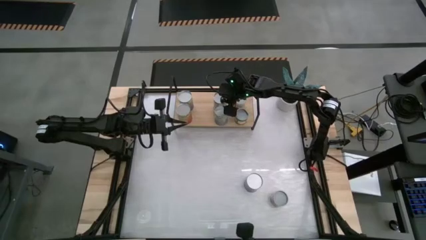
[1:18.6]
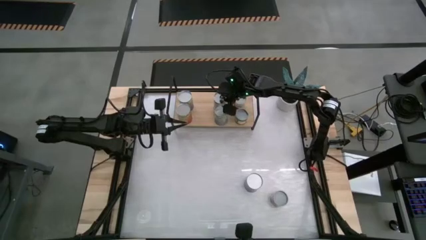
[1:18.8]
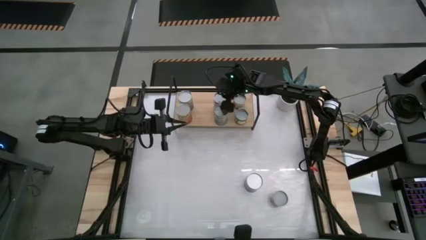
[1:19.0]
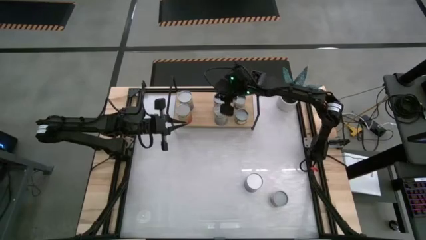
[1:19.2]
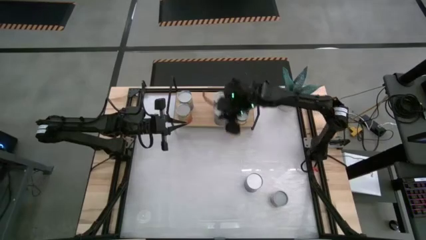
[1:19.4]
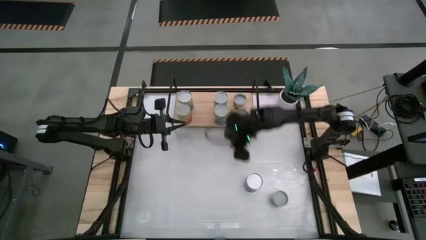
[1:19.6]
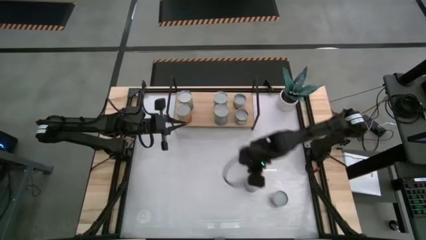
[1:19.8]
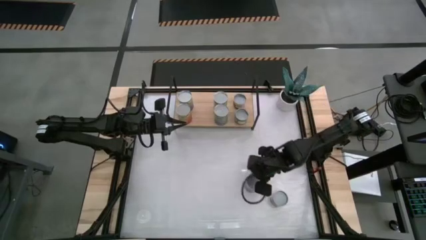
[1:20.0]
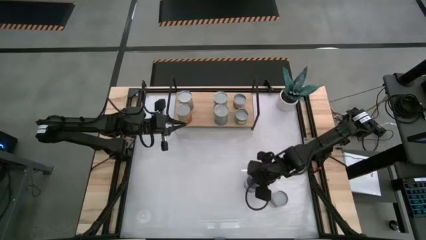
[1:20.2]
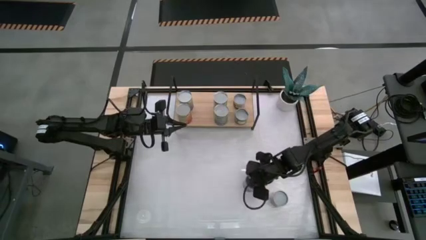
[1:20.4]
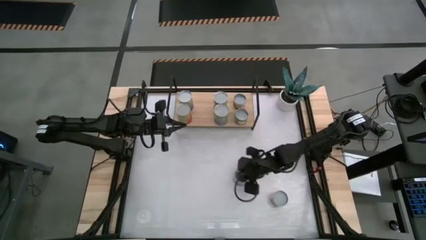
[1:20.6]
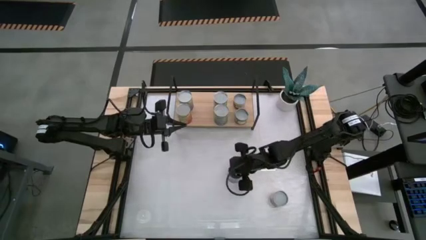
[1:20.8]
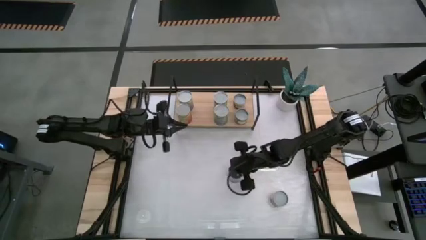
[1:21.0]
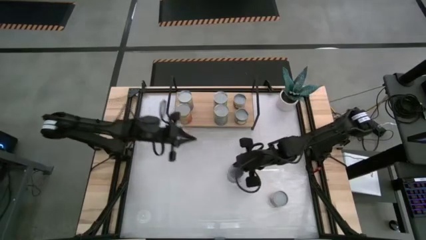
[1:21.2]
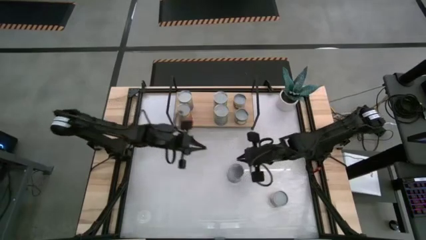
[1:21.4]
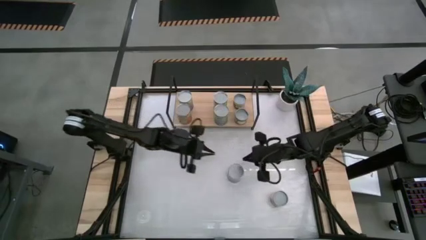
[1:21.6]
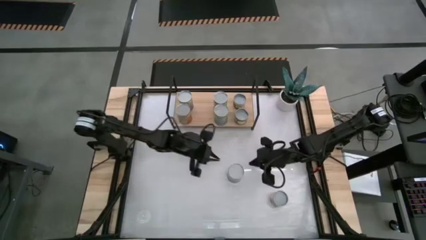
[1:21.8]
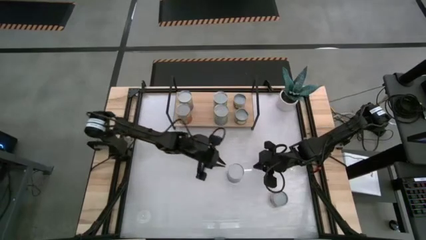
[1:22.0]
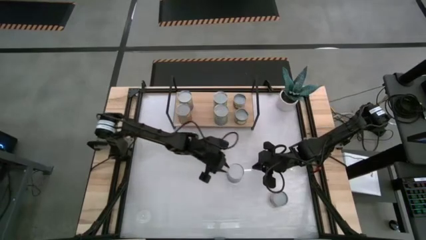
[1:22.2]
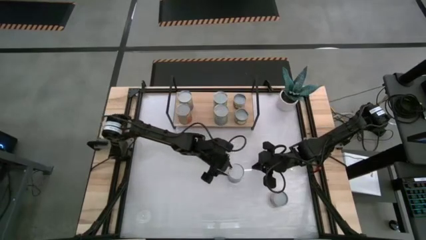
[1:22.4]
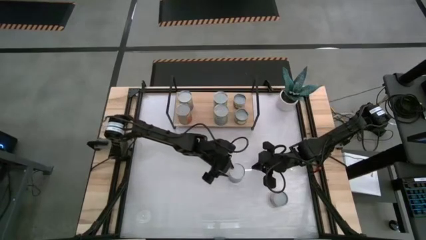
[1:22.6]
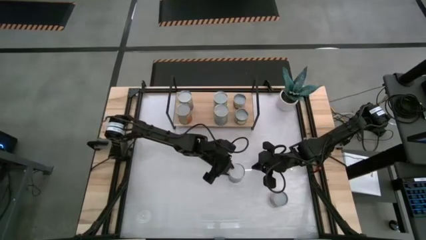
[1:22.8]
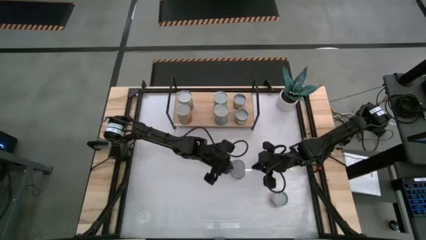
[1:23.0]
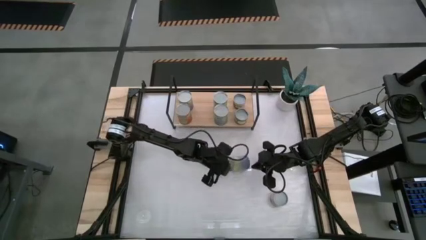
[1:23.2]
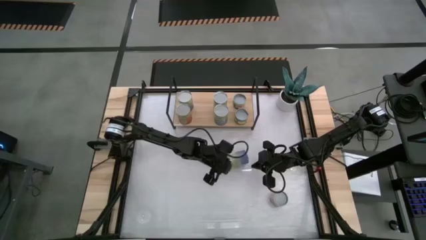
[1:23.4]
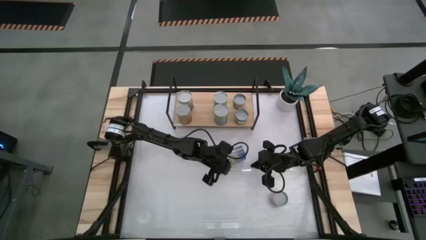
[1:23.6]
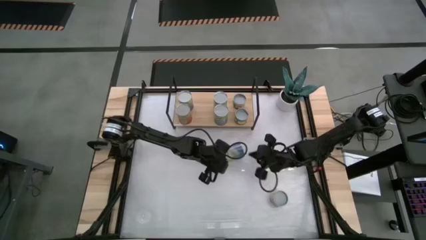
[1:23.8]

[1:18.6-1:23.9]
Task: Pick and place cans onto a shelf
Put the canned peas on the shelf

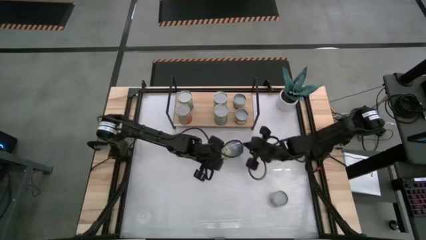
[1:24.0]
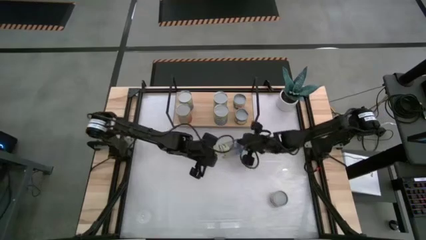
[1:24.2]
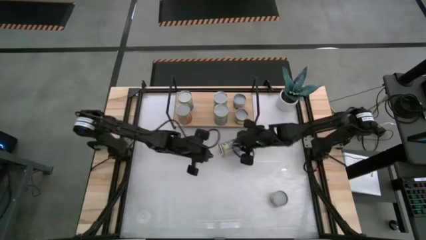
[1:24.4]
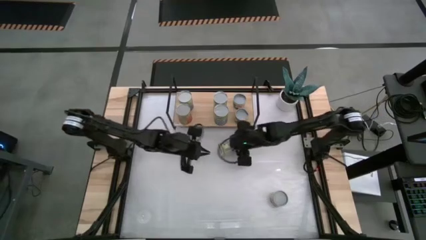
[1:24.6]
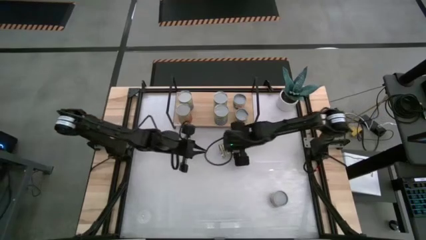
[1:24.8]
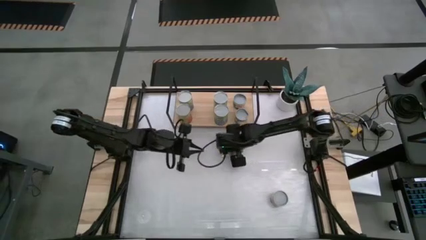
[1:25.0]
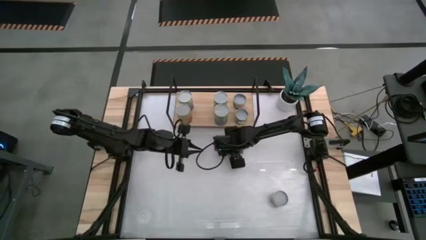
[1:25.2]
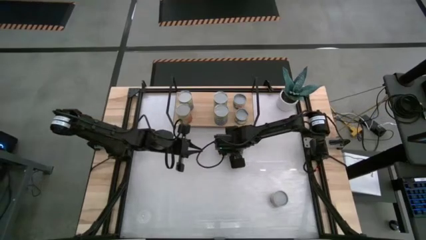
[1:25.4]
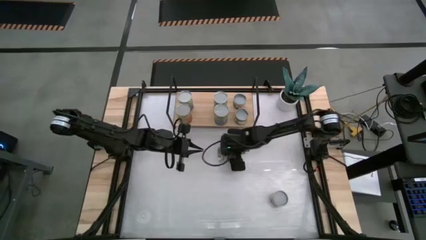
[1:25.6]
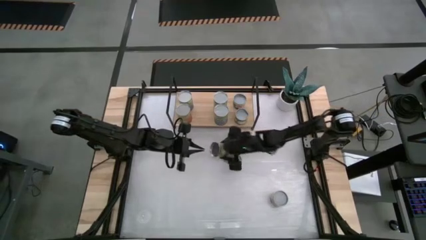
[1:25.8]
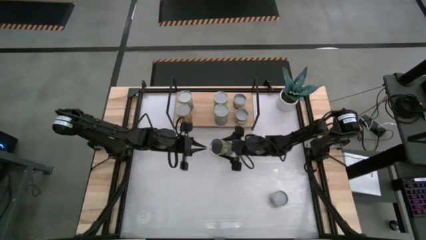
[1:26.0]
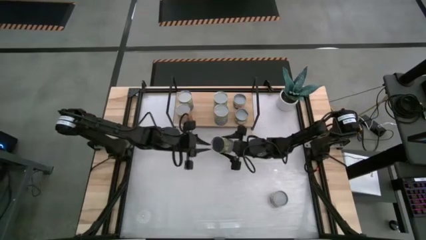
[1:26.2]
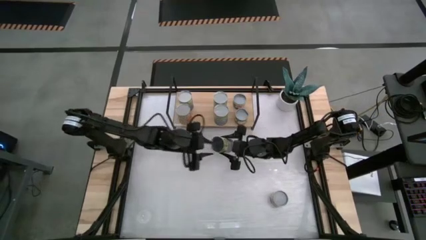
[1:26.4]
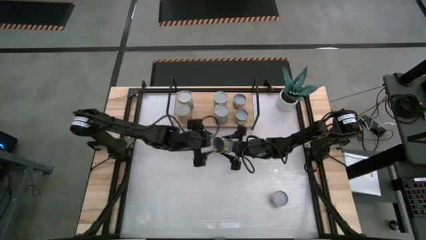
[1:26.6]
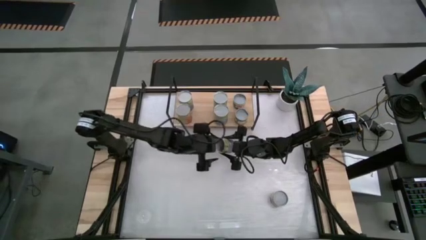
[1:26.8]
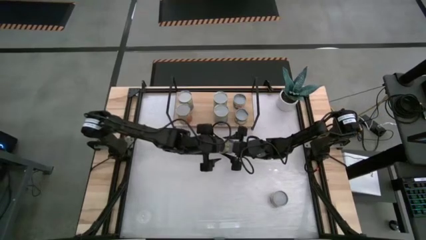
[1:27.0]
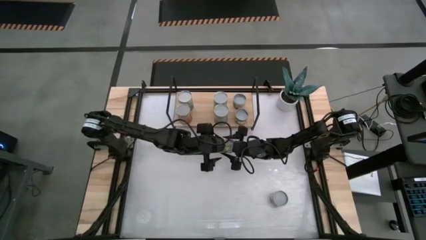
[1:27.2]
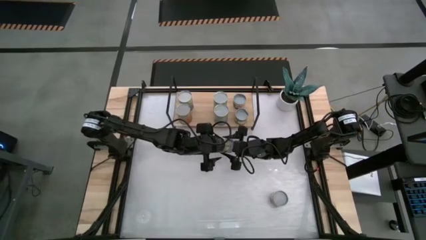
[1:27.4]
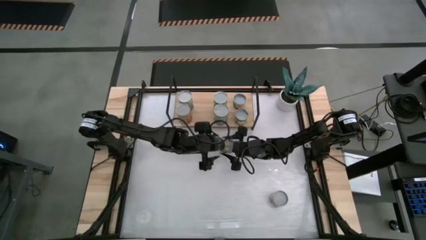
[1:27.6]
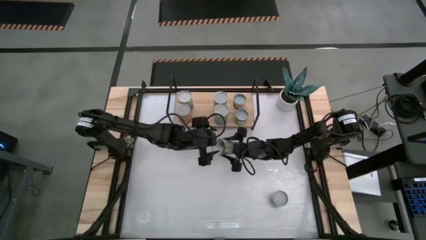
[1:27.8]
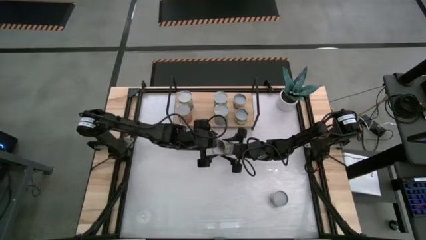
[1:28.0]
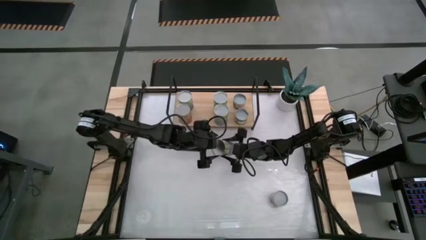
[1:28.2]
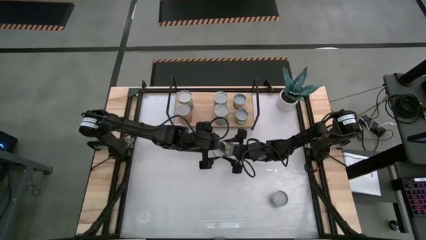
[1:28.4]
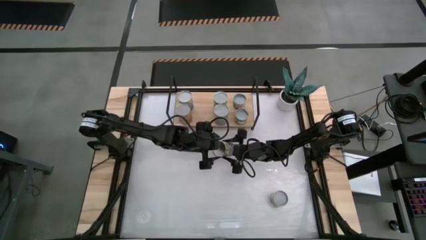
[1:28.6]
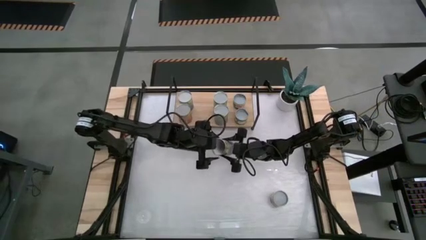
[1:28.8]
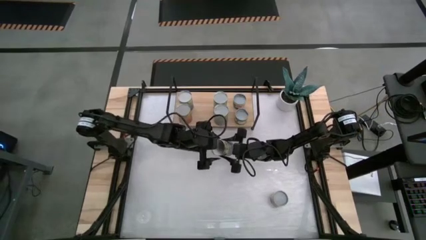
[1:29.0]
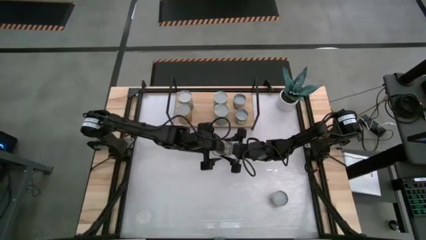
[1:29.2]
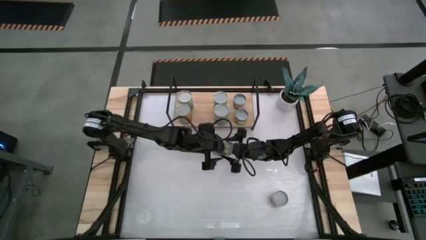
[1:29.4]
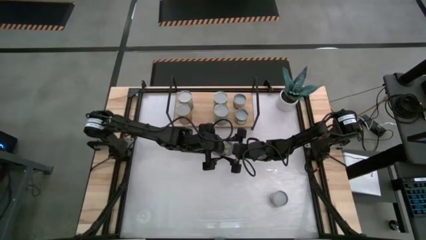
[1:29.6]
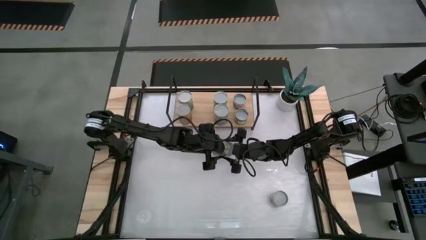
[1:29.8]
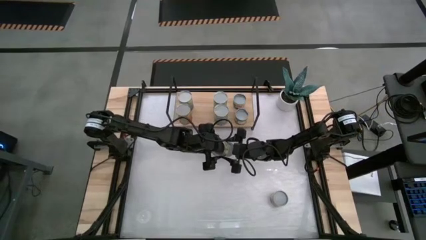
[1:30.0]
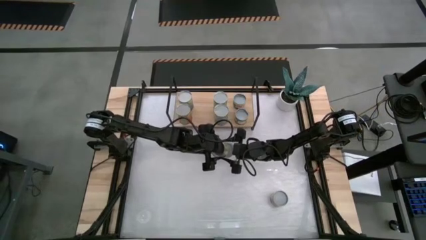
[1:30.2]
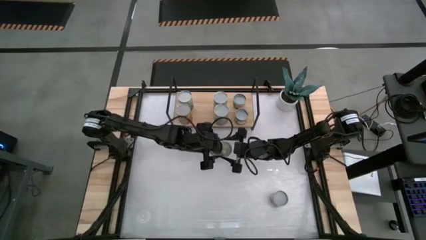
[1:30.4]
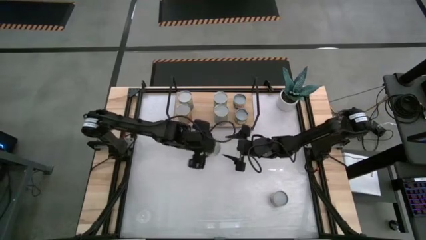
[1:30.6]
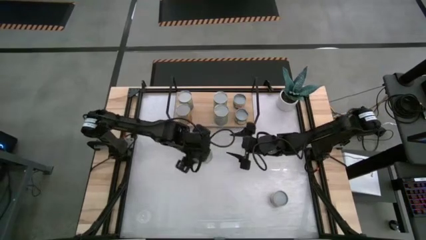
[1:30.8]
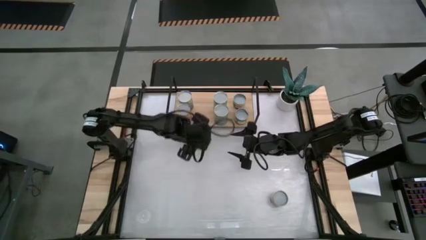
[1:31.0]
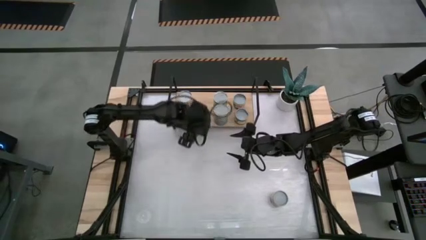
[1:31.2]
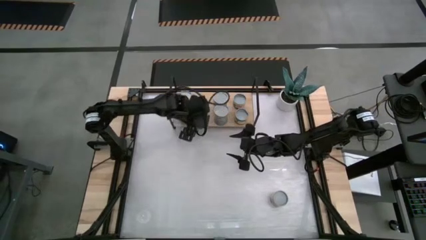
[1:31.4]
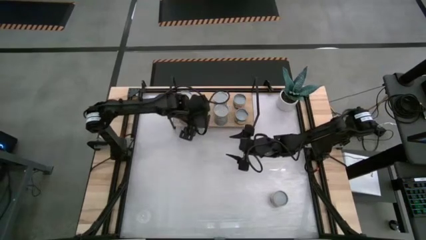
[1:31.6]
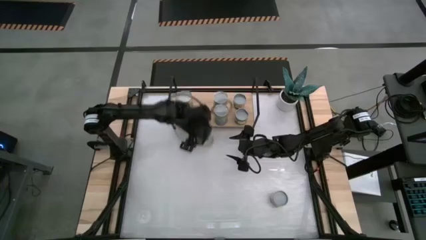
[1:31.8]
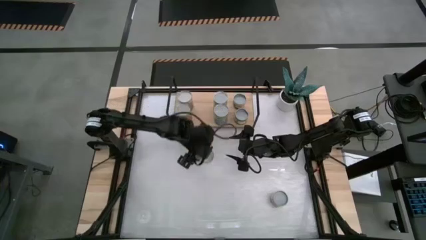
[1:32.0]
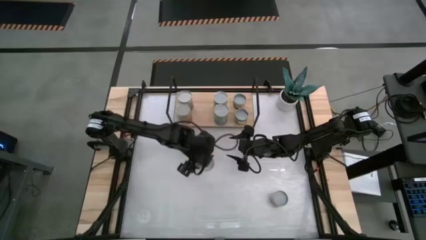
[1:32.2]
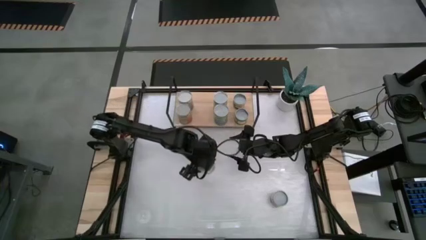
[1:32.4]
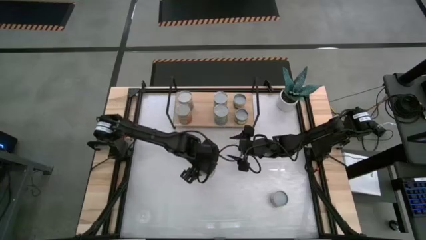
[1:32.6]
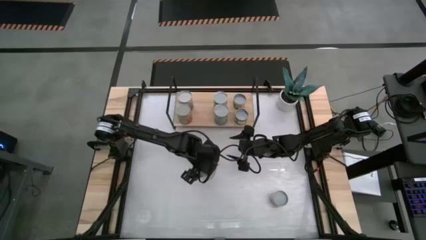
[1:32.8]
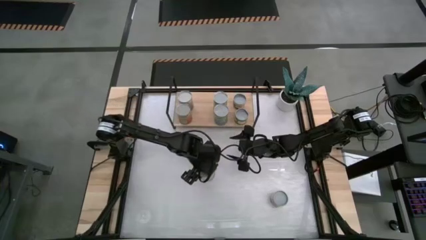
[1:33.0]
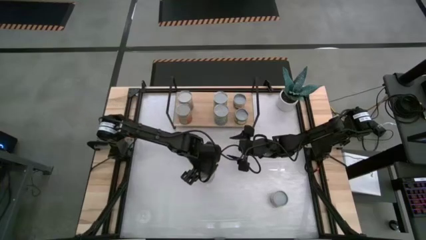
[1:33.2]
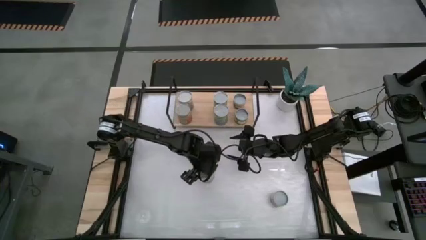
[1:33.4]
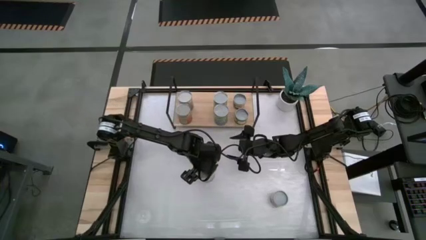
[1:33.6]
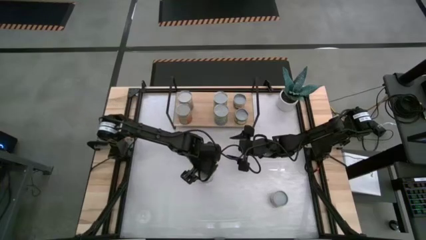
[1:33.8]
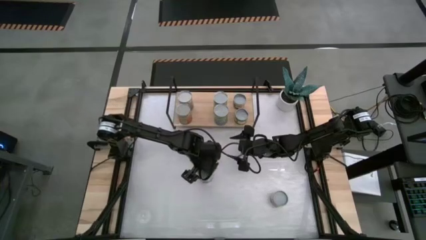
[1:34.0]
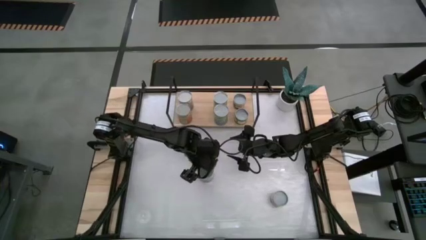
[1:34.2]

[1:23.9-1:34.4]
Put the canned peas on the shelf

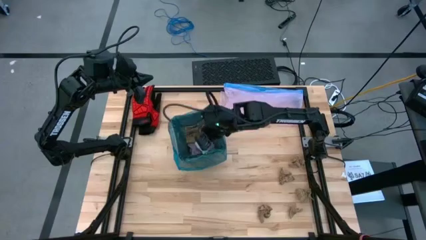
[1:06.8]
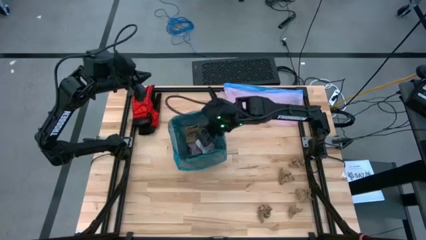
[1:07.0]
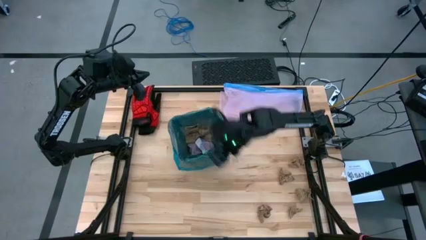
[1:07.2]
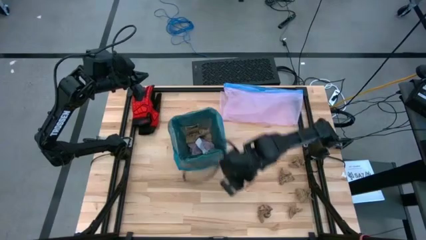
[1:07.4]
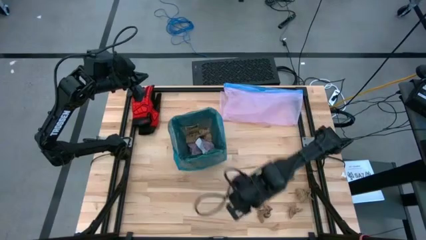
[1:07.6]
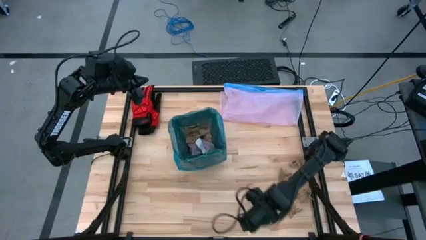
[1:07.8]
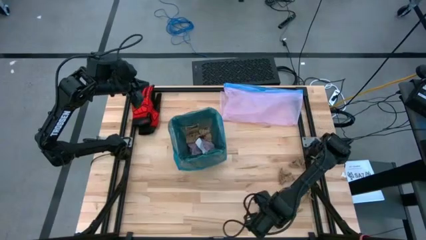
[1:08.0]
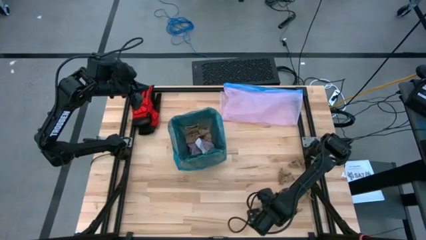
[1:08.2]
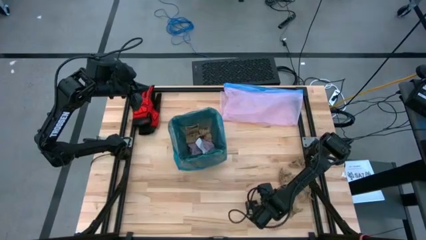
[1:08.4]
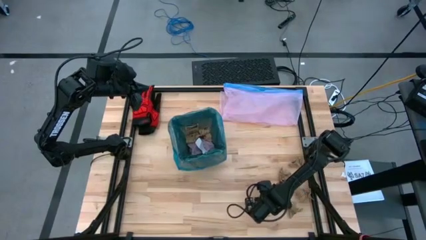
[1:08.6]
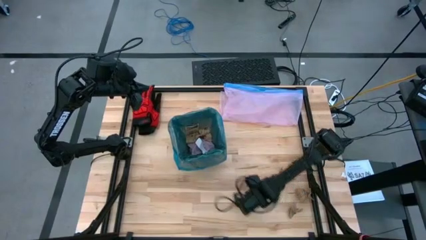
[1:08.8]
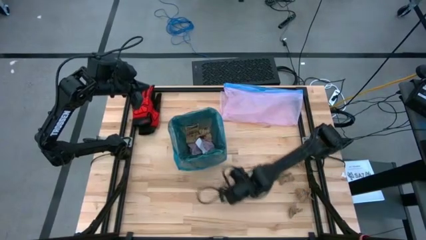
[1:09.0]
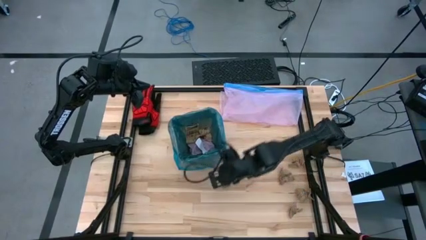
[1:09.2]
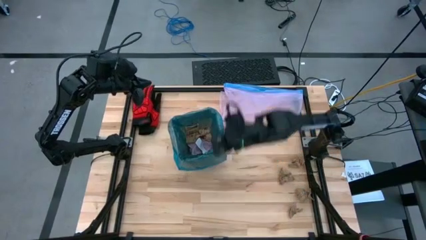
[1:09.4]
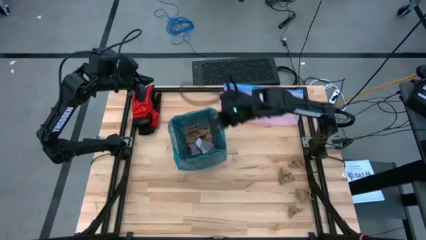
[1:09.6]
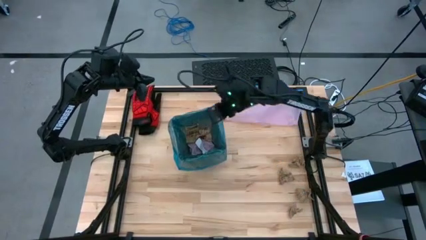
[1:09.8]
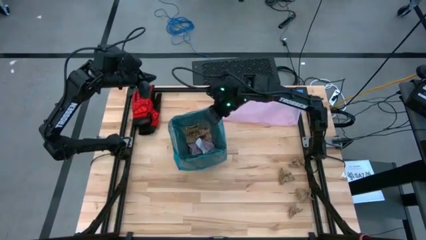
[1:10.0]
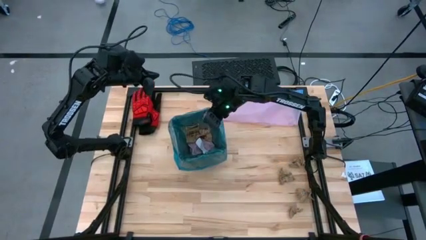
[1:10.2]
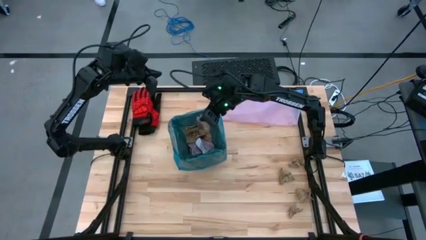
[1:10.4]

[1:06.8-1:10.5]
Task: place trash/remove bag and relplace
Put the brown napkin into the black trash bin
